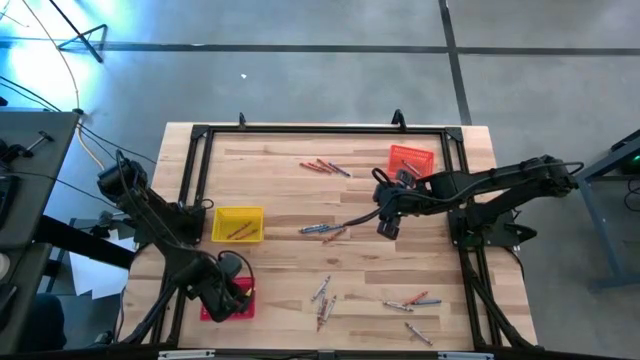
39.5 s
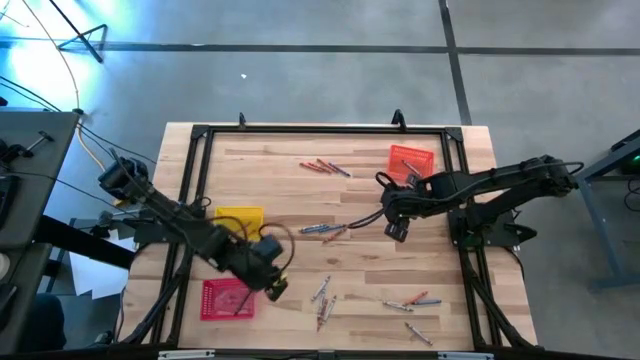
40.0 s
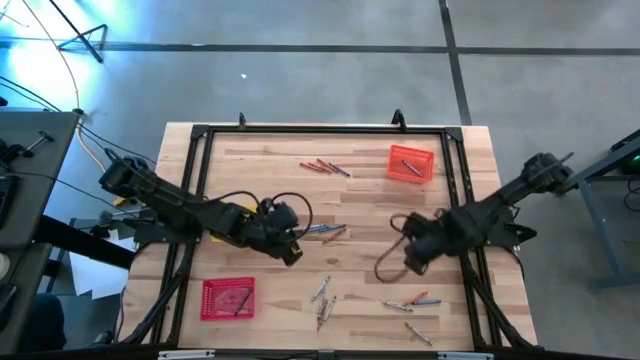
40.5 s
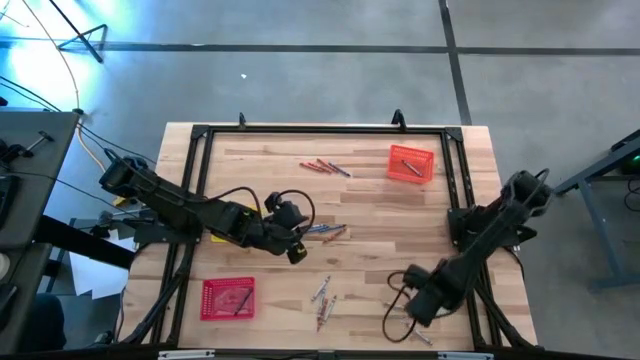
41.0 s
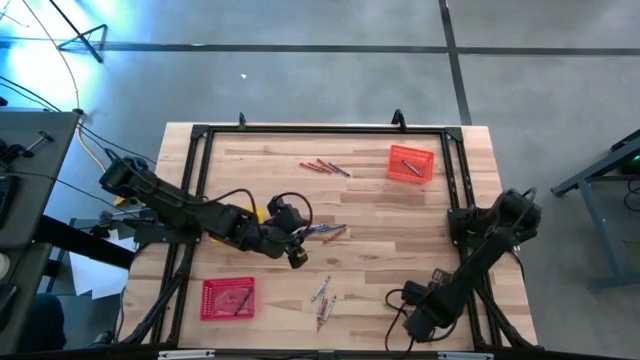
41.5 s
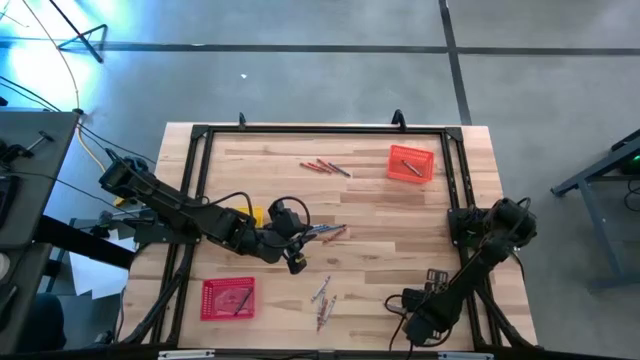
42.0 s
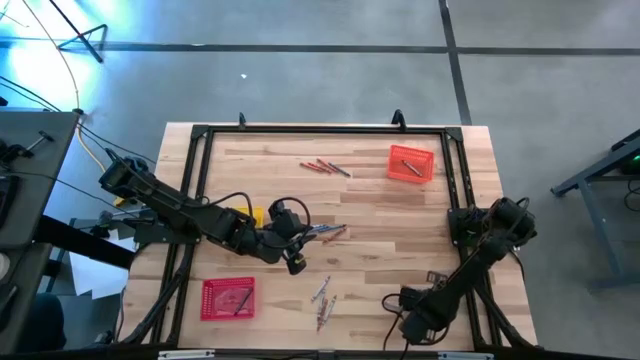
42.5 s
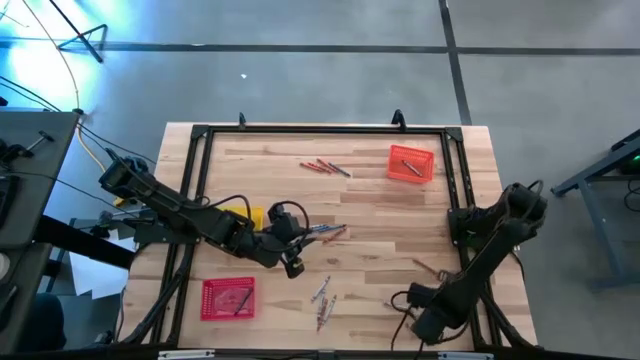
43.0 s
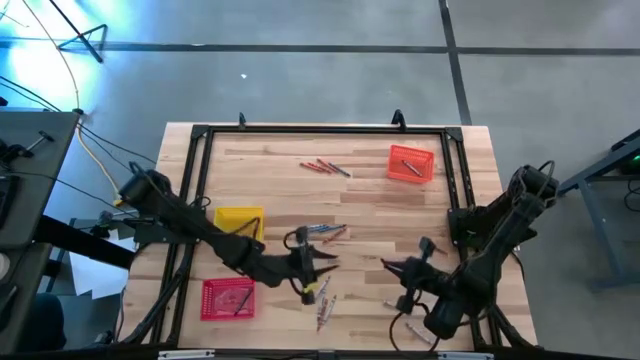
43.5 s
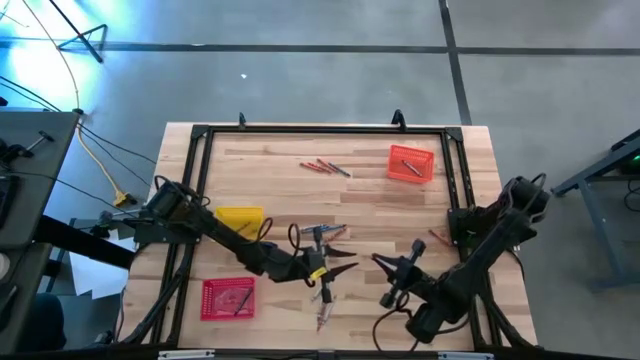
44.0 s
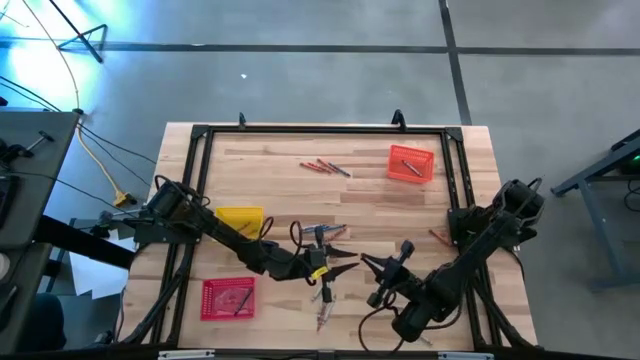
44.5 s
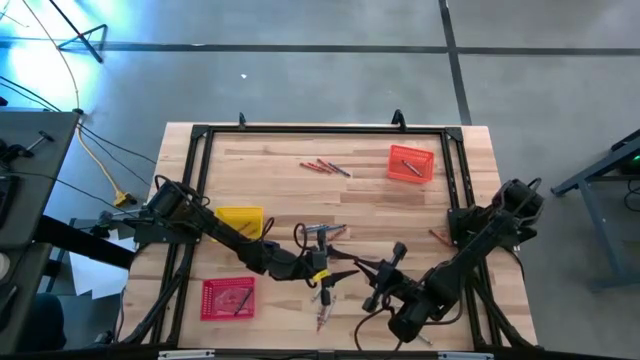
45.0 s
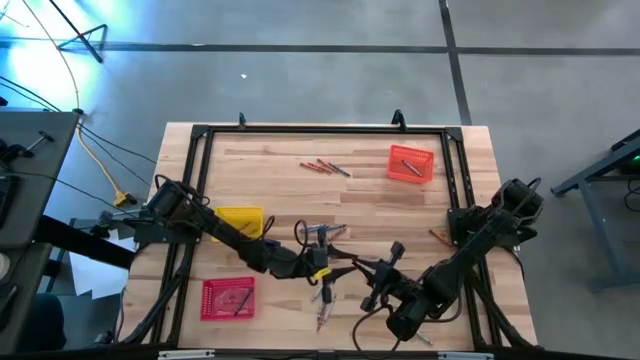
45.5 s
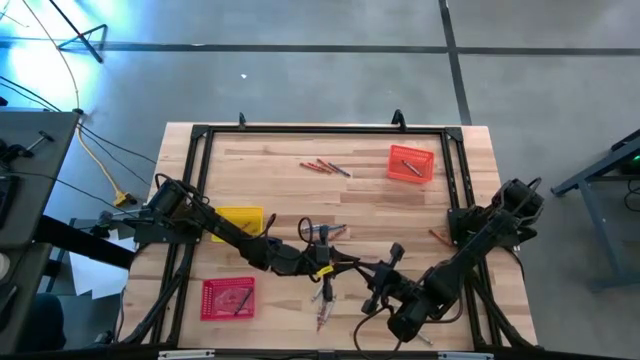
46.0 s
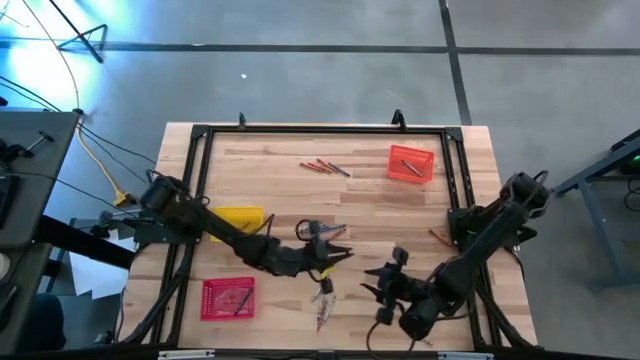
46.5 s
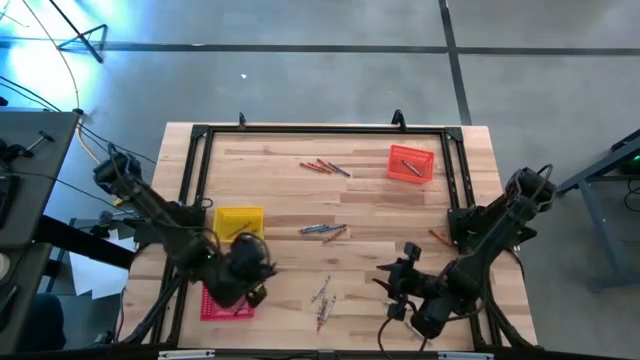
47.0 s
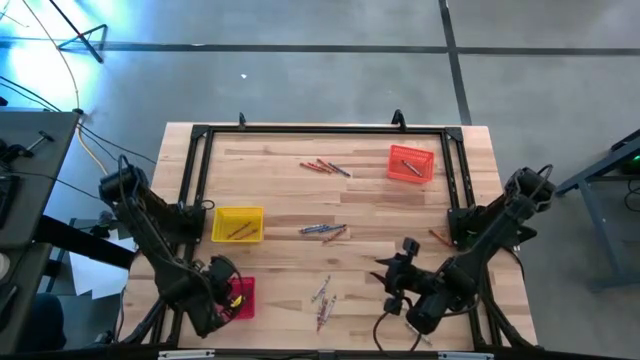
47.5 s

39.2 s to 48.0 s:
Task: Sort crayons
Put the blue crayon into the red bin

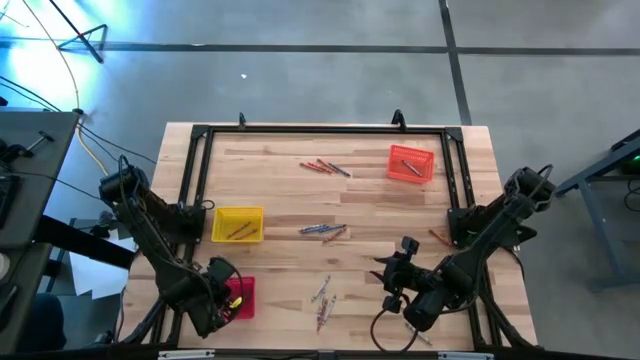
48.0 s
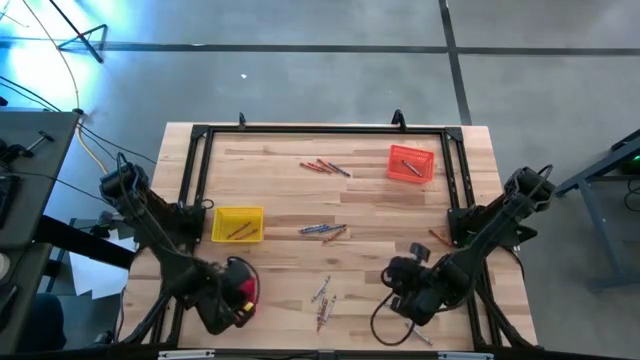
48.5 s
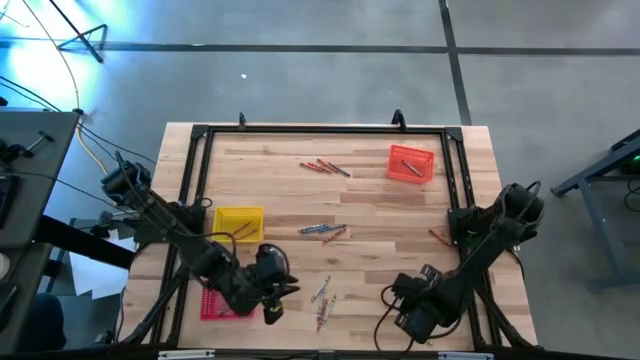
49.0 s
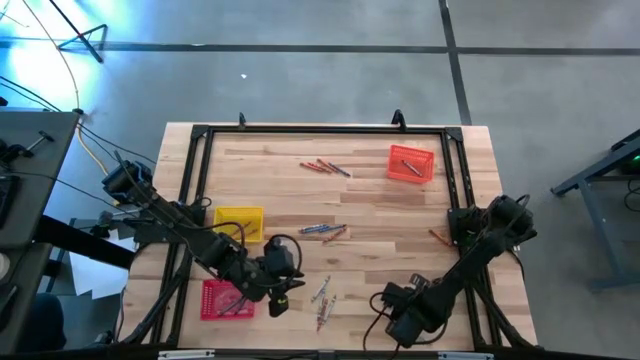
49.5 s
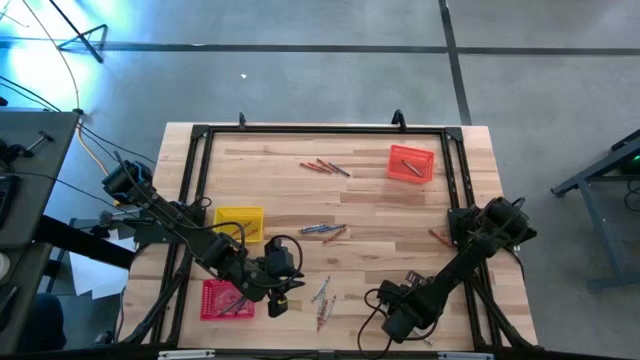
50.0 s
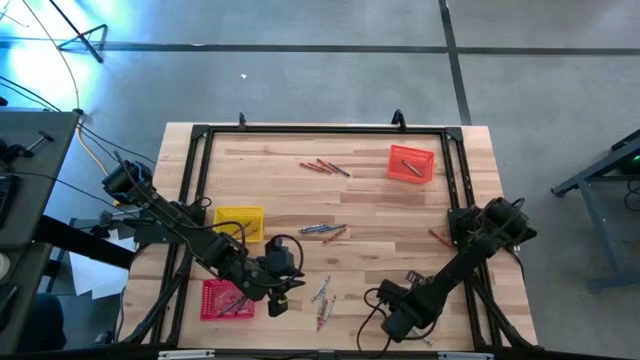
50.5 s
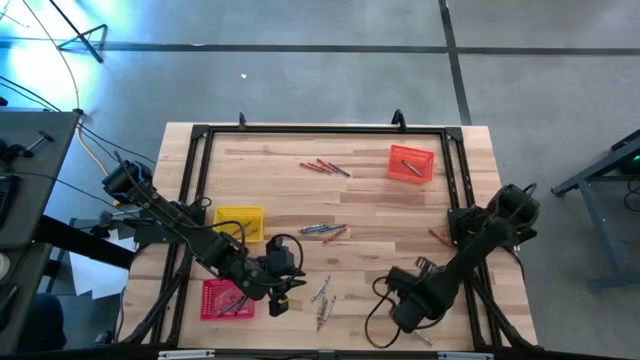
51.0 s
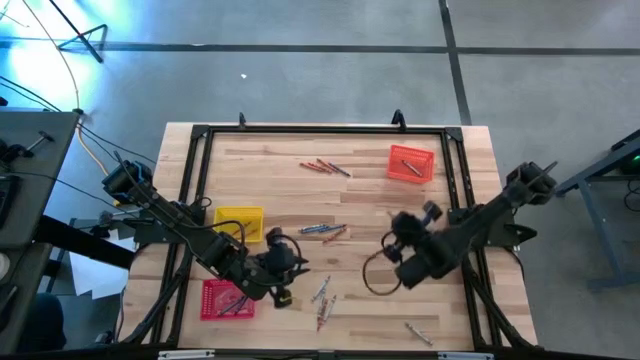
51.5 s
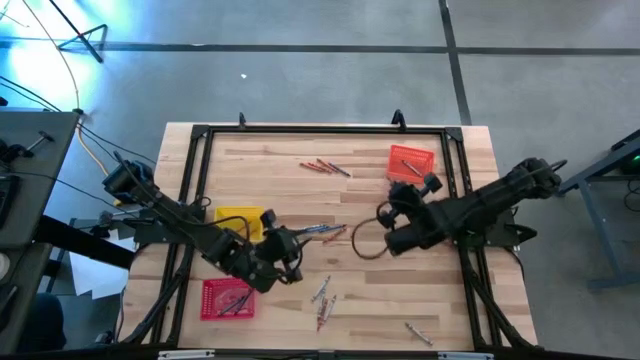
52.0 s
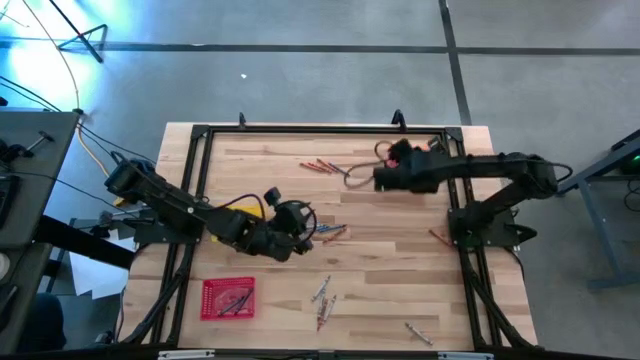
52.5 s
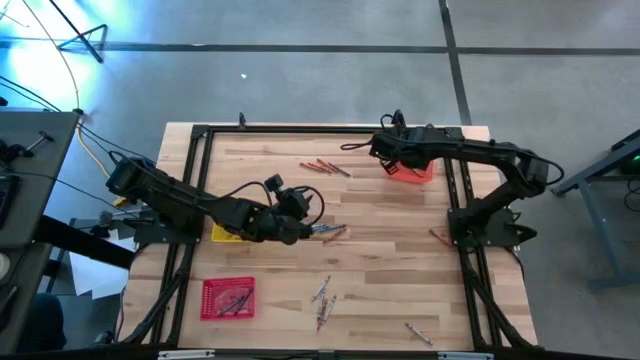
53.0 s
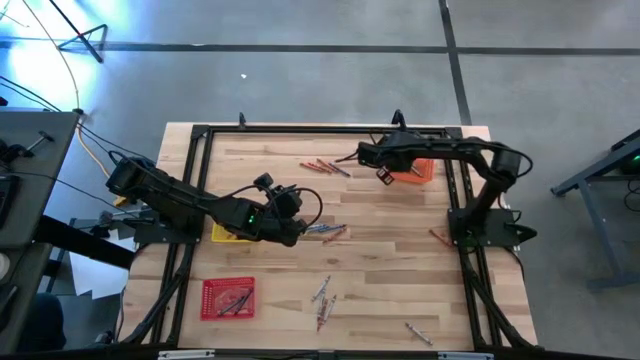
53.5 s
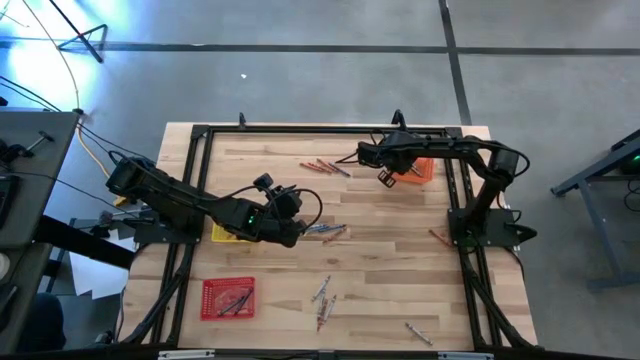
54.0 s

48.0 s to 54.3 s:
Put the gray crayon into the orange bin

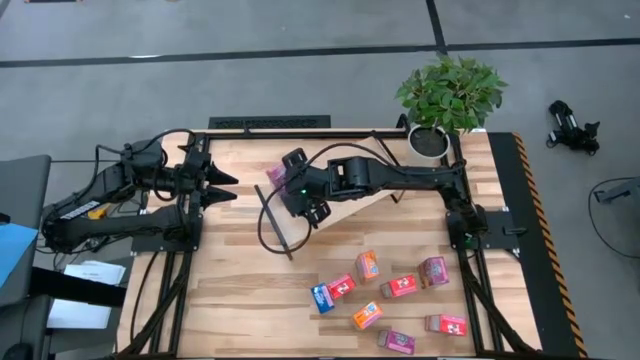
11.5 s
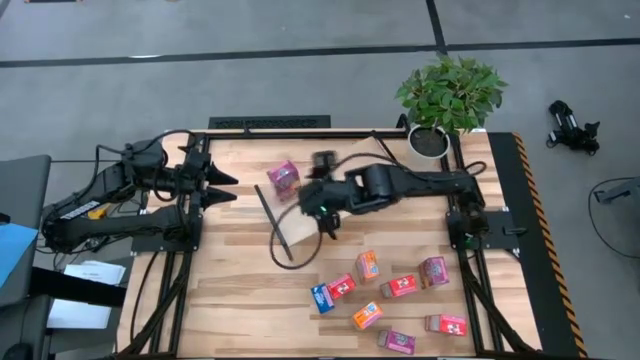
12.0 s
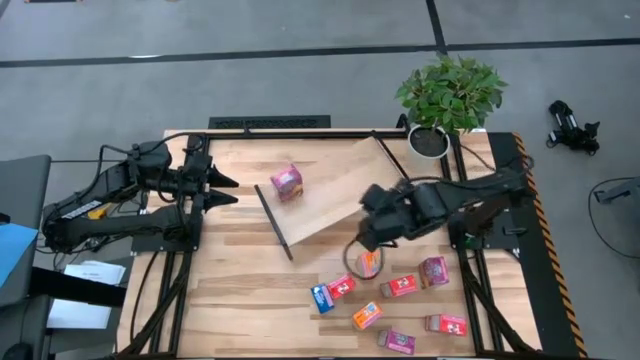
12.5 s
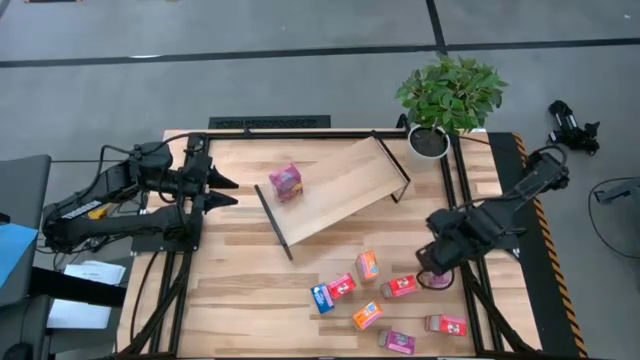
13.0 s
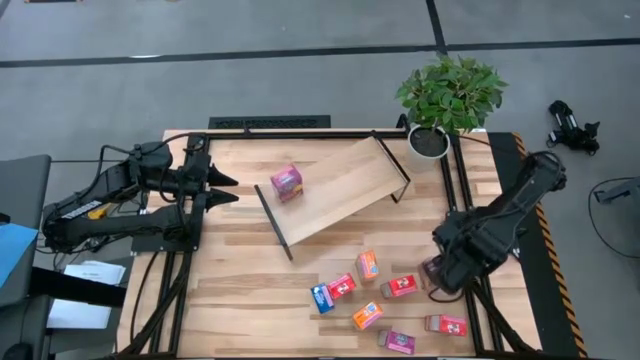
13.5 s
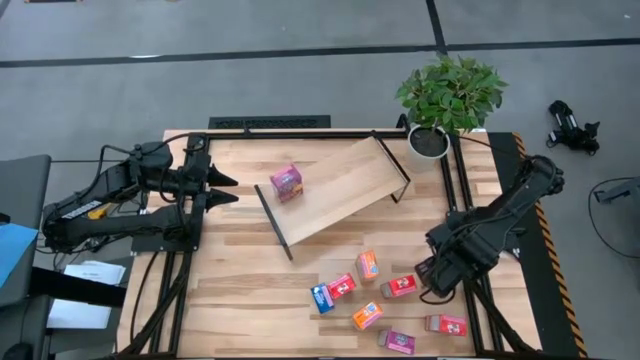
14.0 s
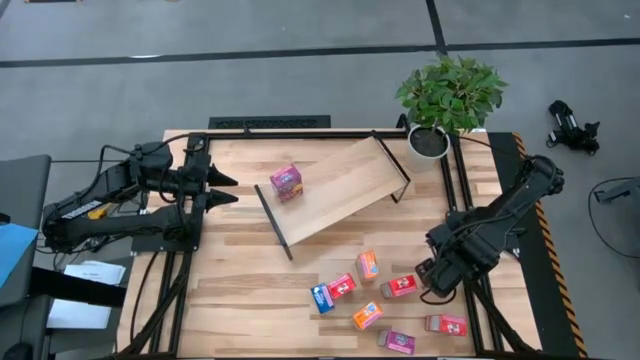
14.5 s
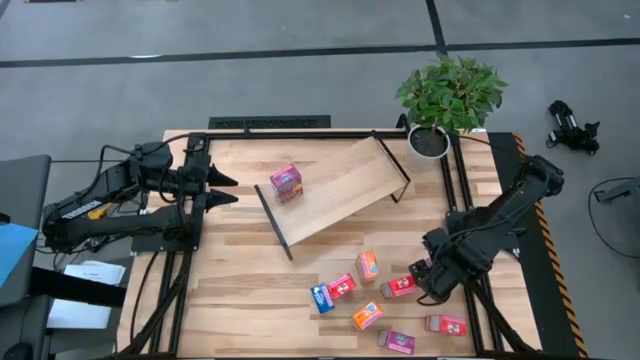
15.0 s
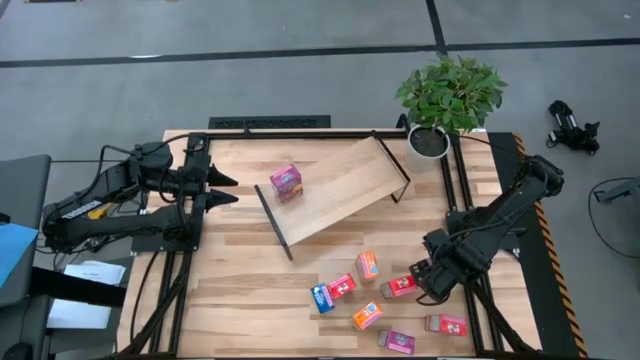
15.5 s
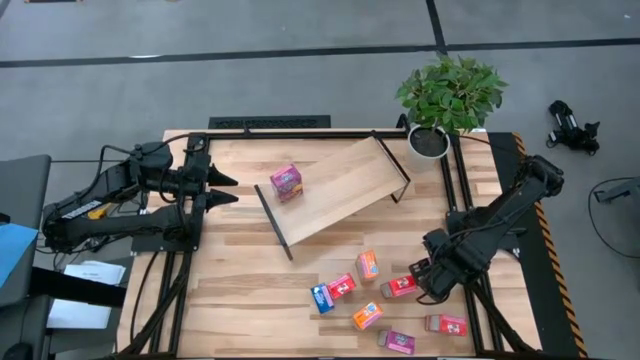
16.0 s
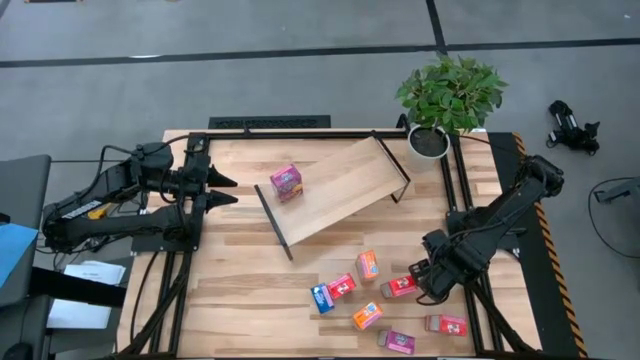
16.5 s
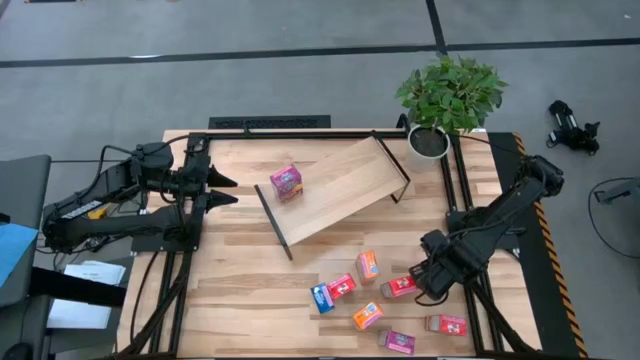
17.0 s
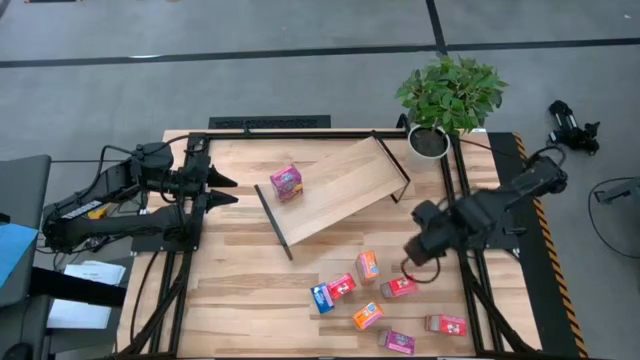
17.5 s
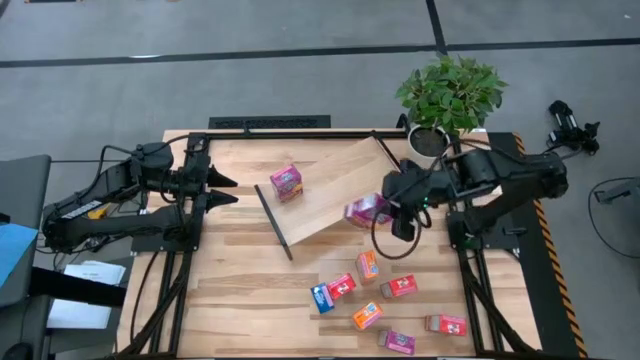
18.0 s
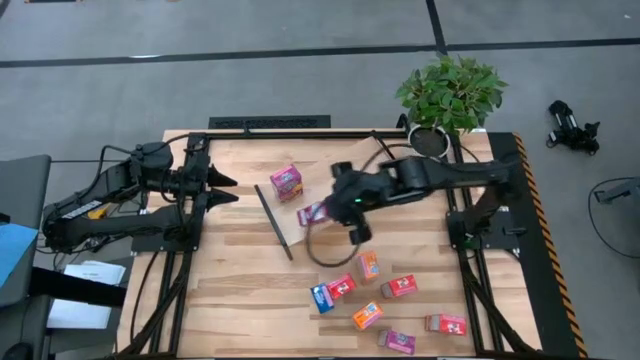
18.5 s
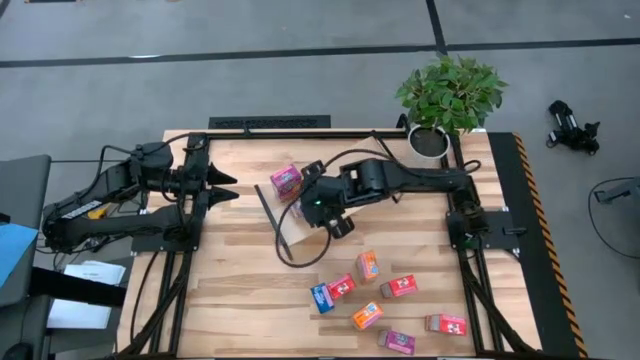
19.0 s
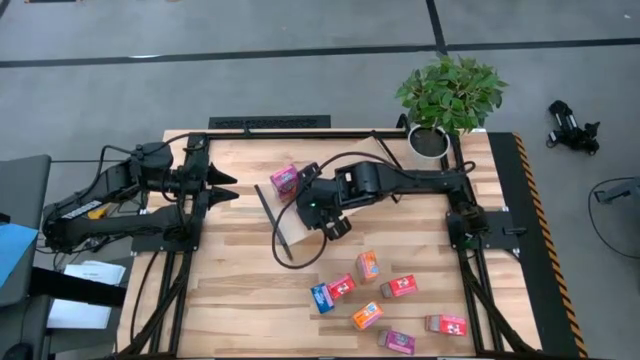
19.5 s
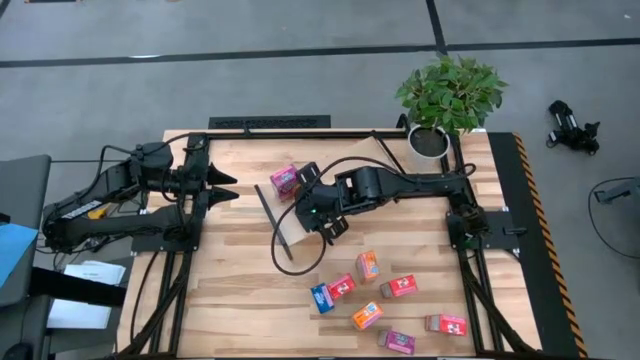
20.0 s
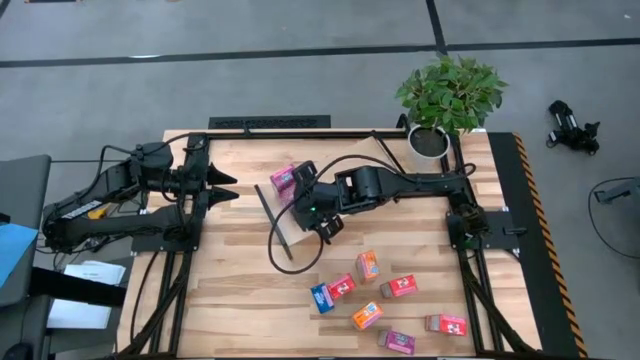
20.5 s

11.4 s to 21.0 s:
Task: Stack cereal on shelf
Put the top purple cereal box aligned with the other purple cereal box on the shelf
